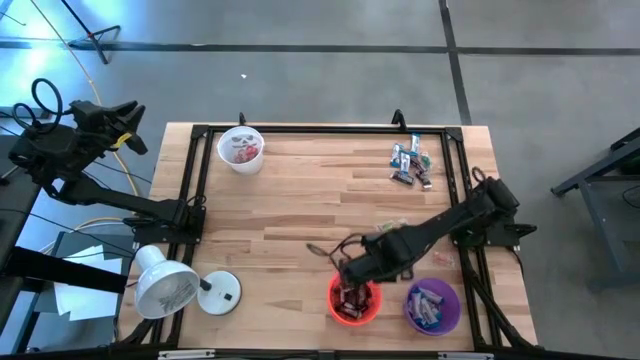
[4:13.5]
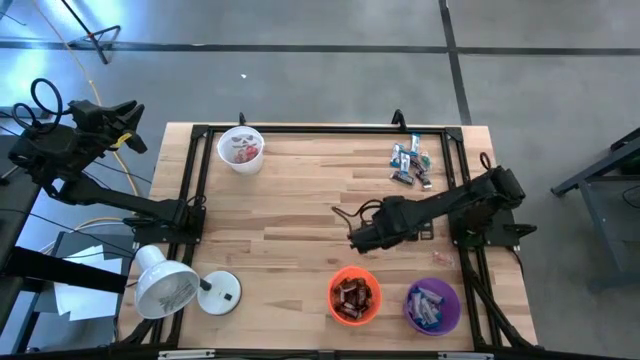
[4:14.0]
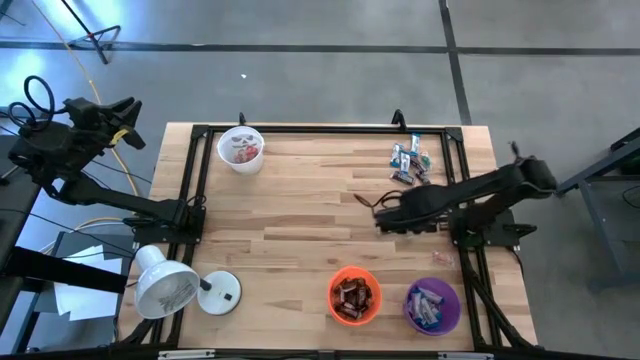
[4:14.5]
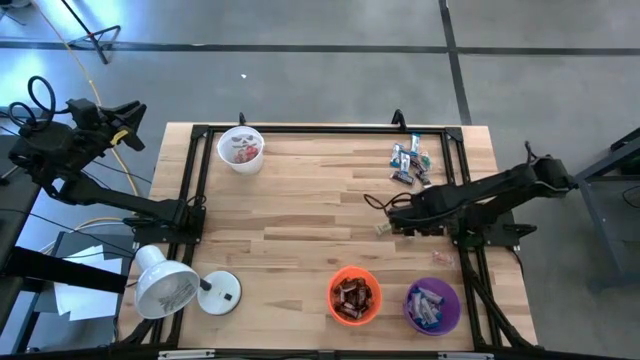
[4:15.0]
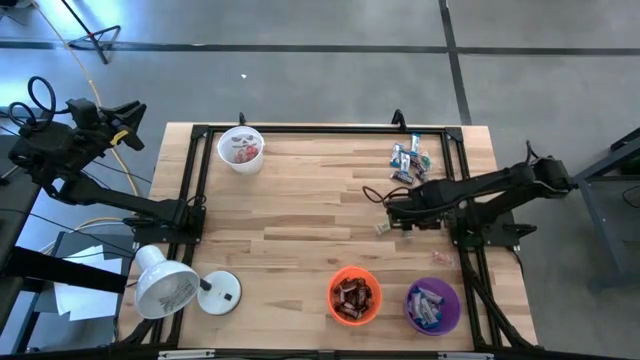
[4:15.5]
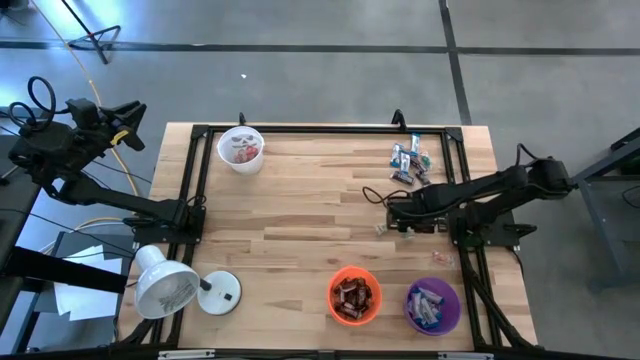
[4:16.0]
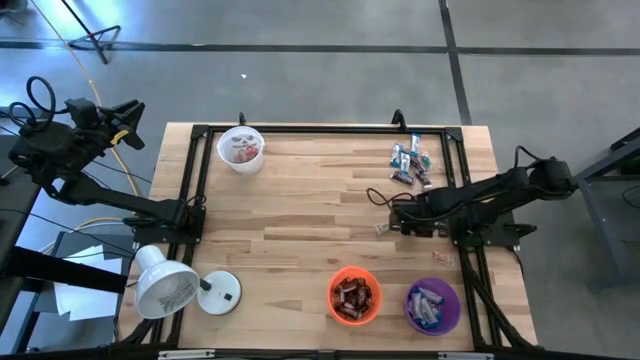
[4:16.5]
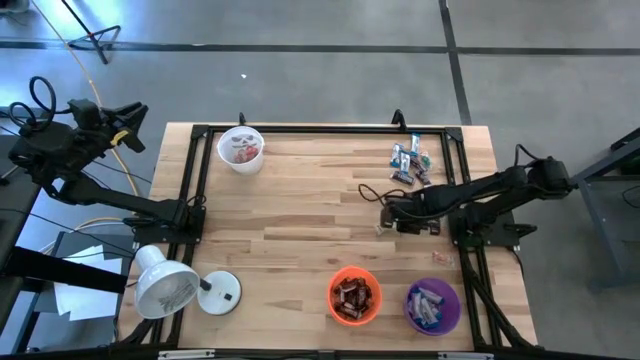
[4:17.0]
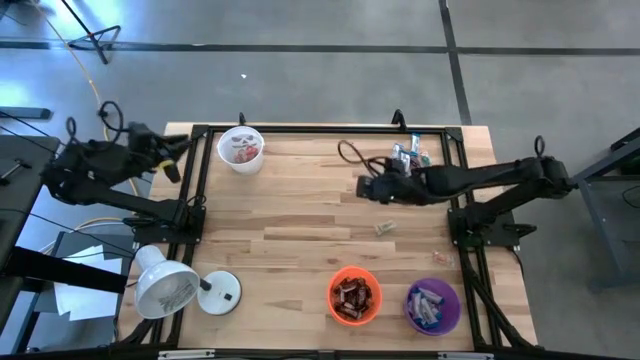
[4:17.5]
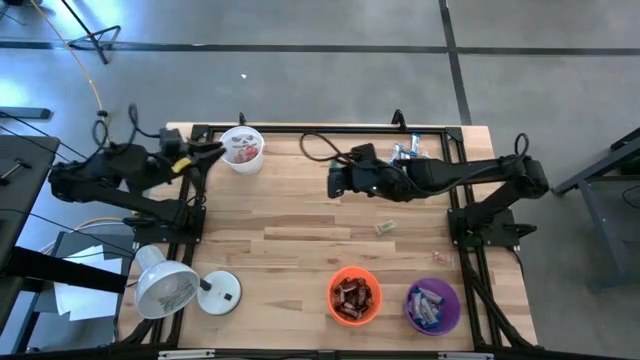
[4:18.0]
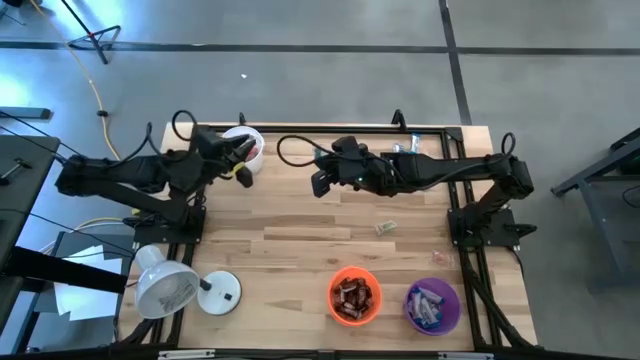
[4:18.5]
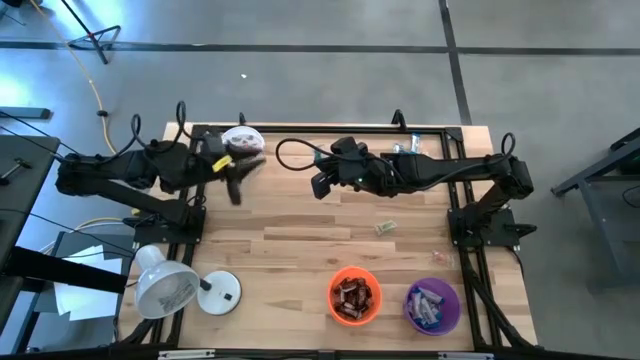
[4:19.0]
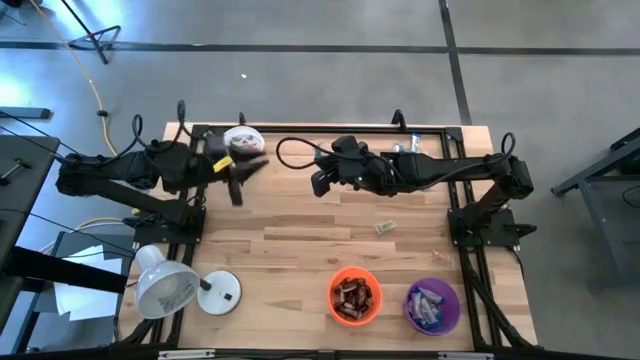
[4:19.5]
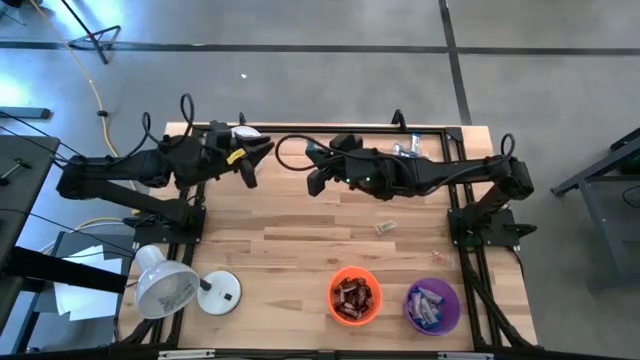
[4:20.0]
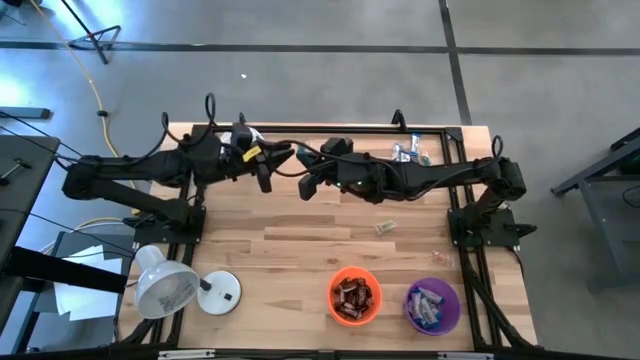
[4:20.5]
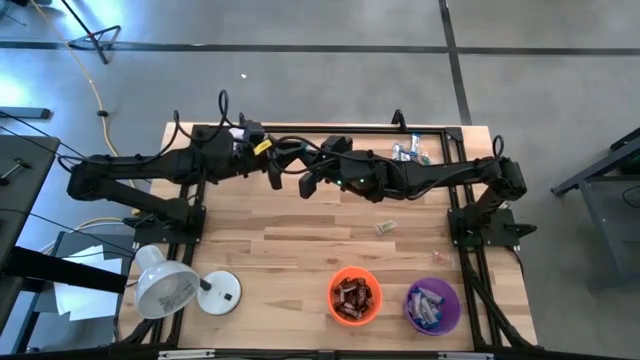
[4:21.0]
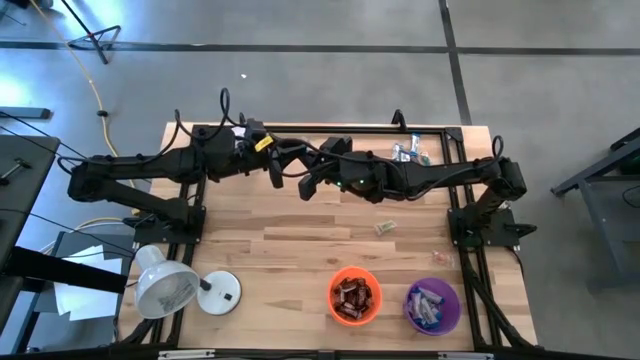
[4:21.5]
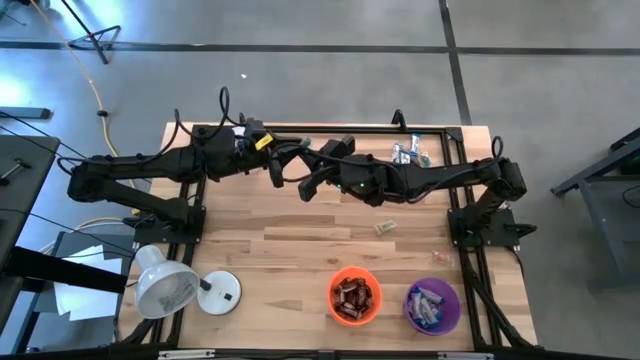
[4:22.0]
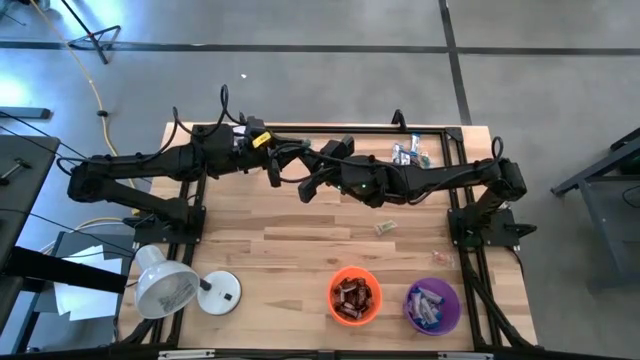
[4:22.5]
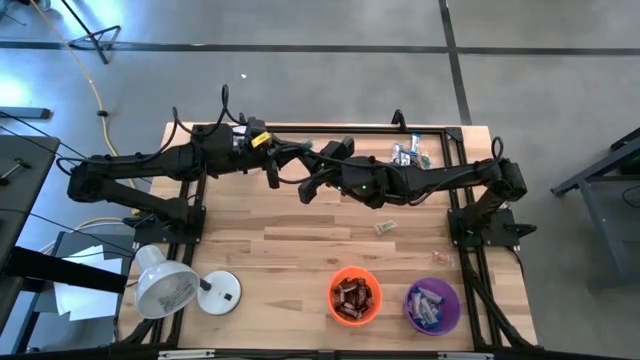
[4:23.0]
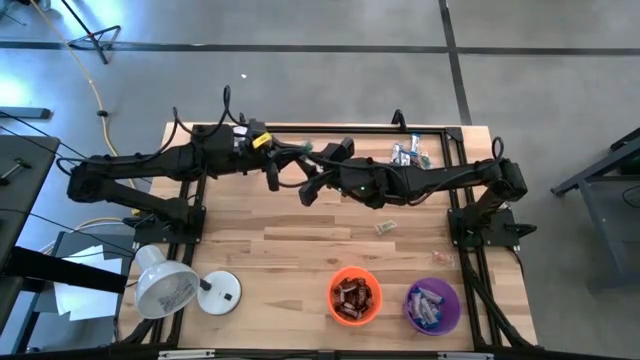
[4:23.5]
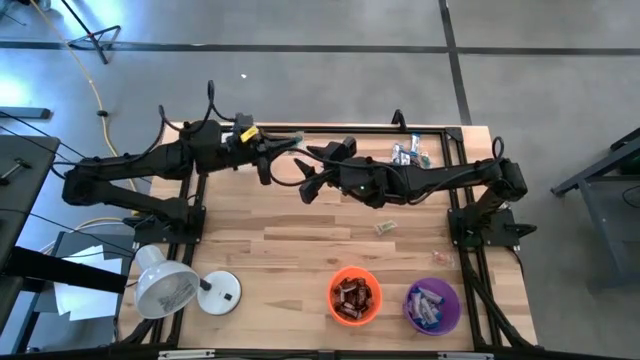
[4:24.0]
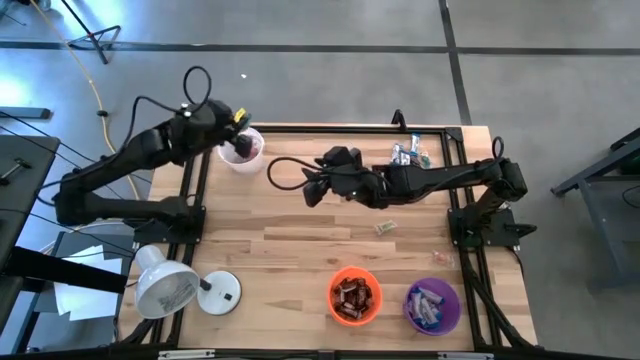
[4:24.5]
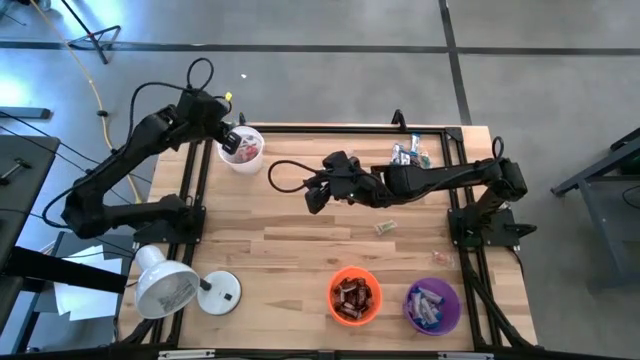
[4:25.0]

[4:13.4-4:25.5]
Task: Organize candy in baskets
Put the blue gummy into the white bucket

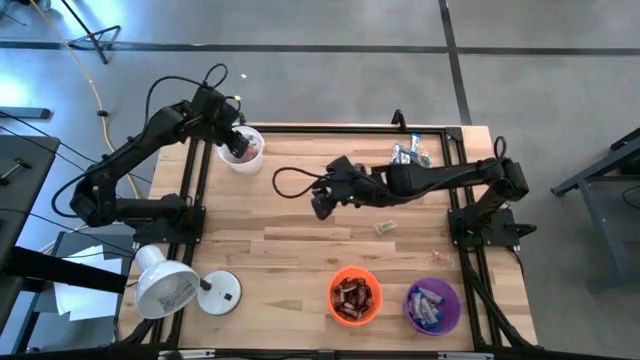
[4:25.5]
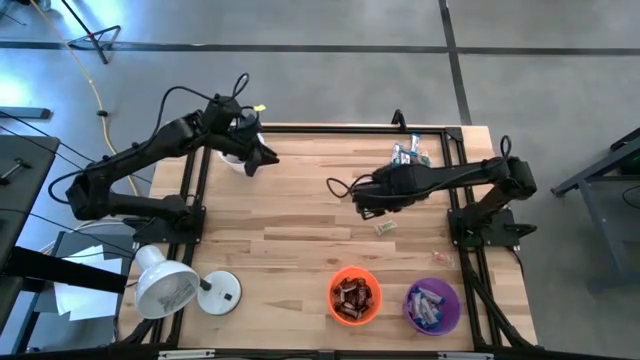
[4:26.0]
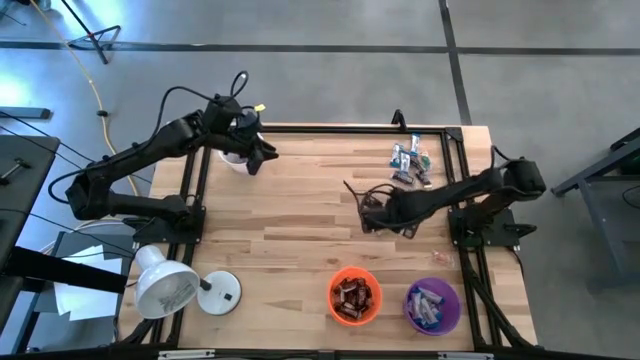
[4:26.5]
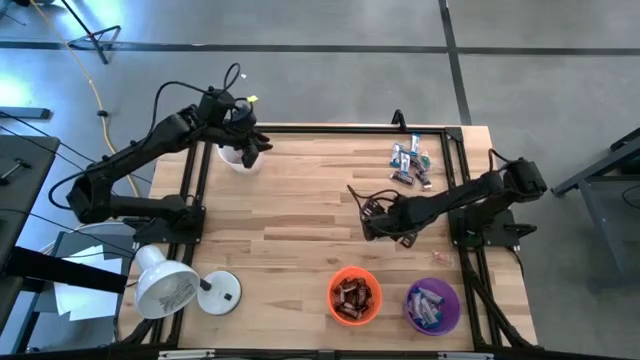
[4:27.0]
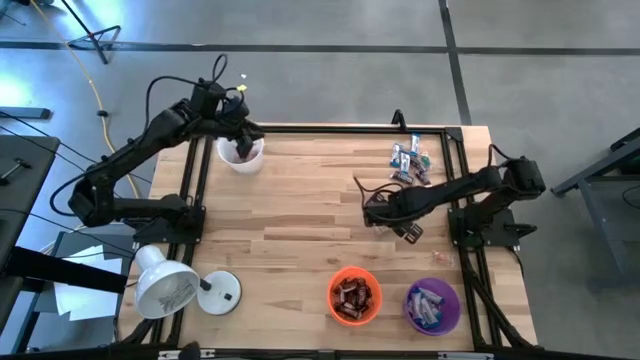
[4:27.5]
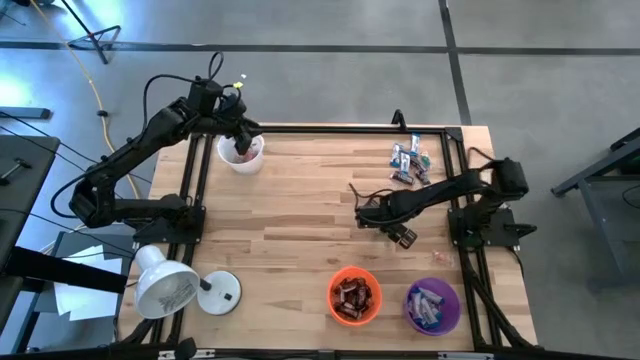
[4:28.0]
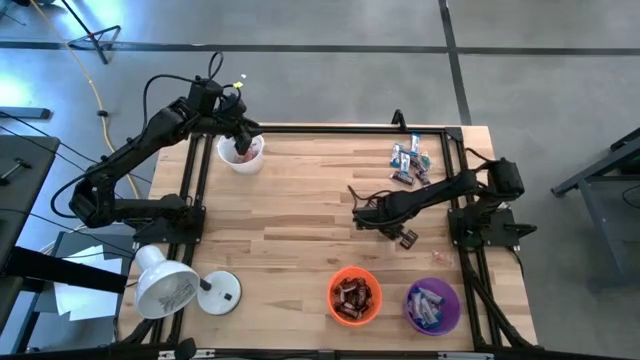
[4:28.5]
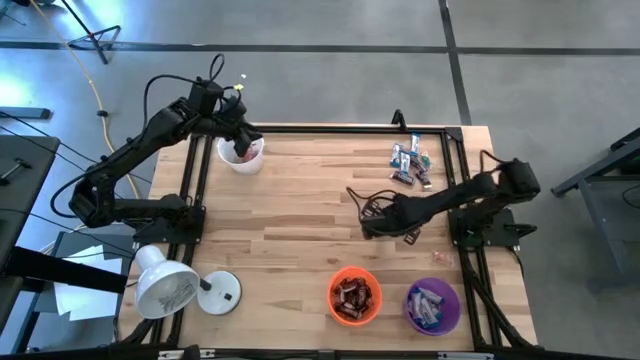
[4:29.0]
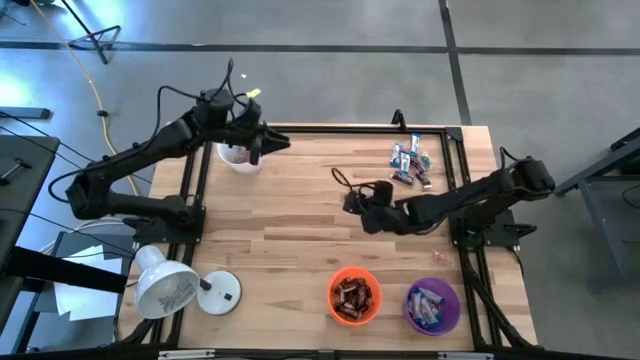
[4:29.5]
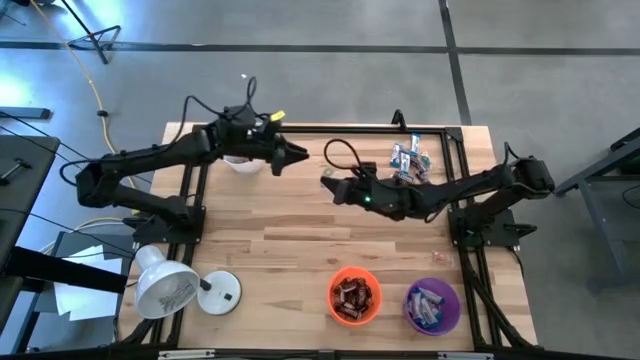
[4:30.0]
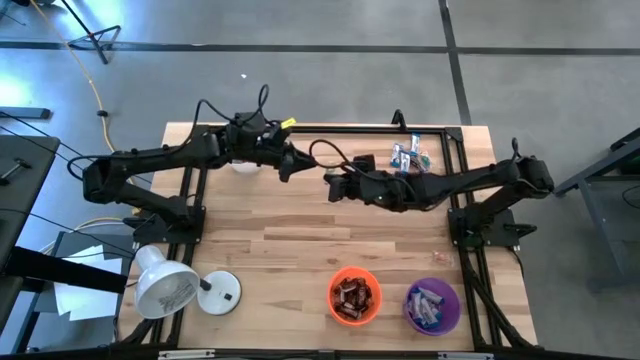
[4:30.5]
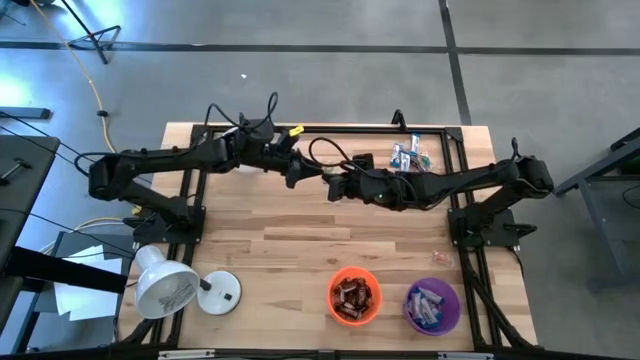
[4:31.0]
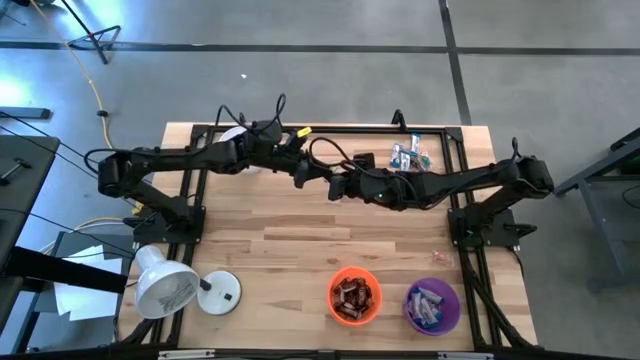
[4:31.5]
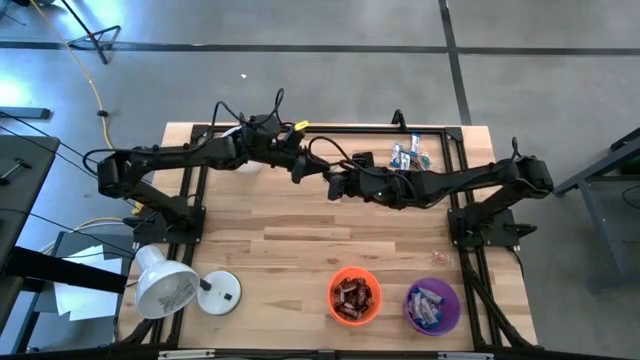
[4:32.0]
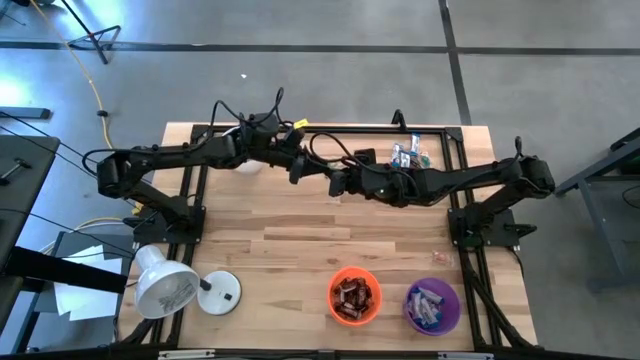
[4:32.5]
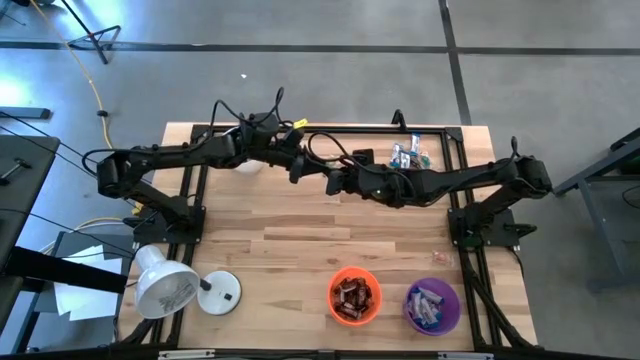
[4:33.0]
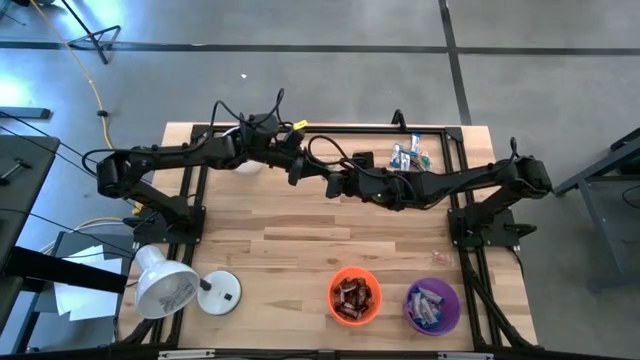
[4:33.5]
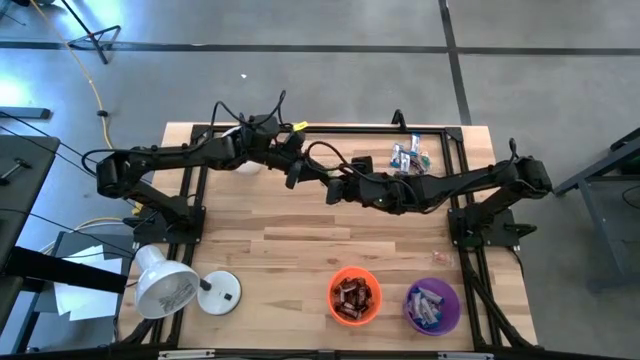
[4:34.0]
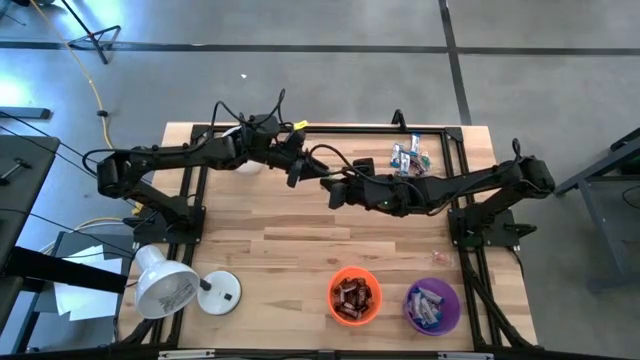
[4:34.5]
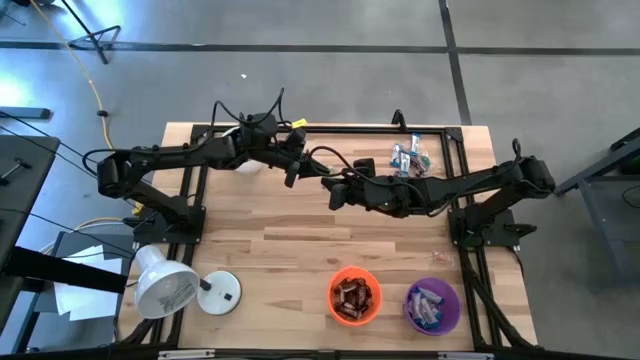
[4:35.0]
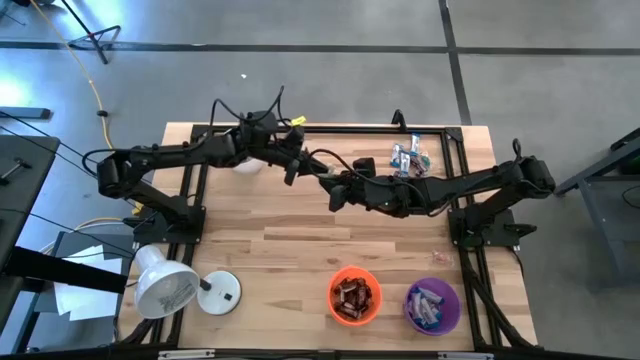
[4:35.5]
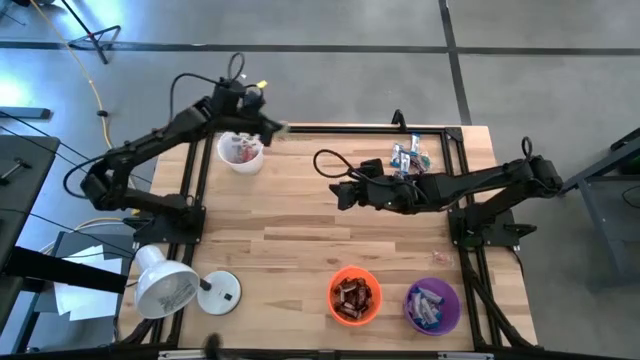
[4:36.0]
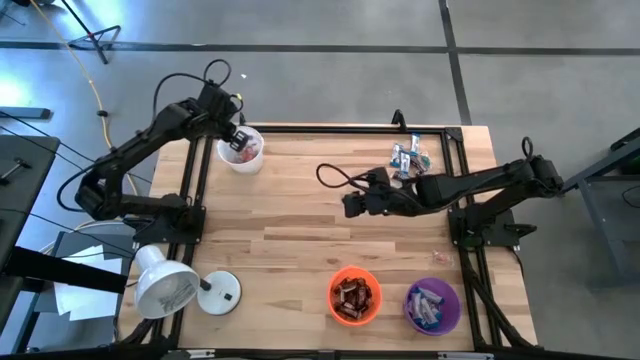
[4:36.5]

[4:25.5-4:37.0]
Put the green gummy into the white bucket
